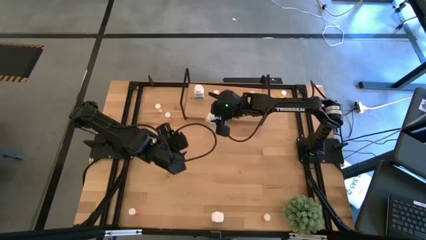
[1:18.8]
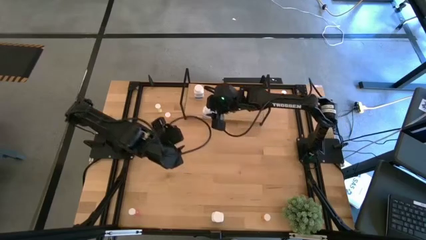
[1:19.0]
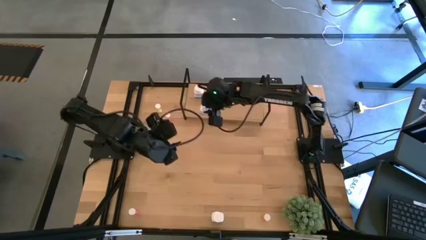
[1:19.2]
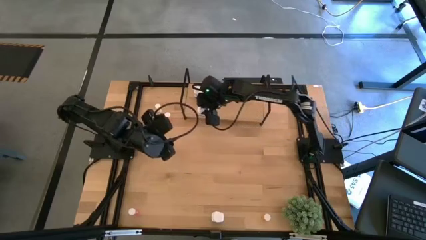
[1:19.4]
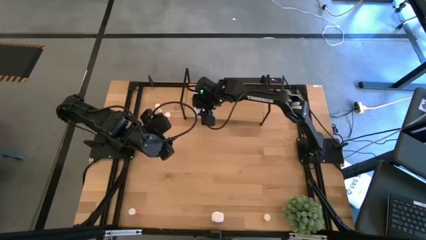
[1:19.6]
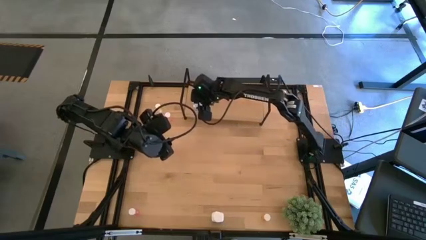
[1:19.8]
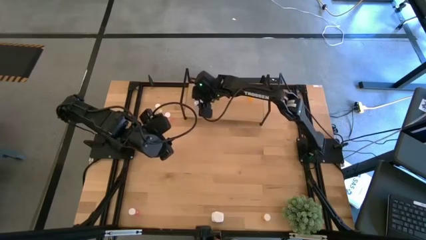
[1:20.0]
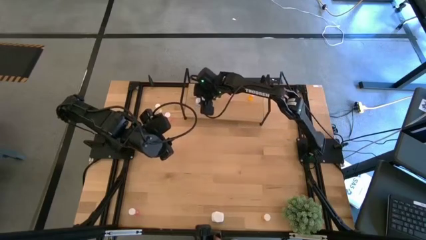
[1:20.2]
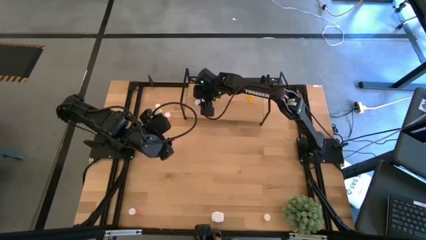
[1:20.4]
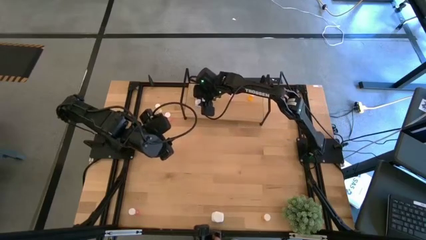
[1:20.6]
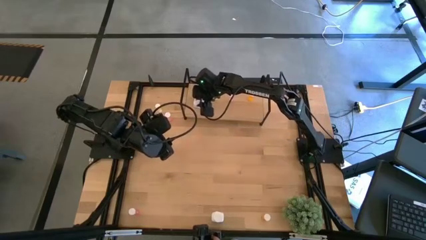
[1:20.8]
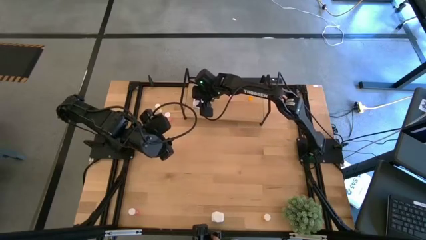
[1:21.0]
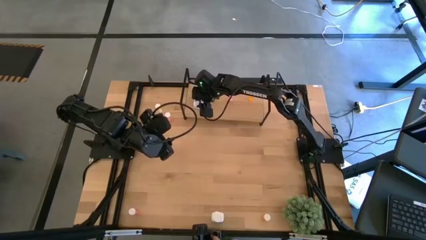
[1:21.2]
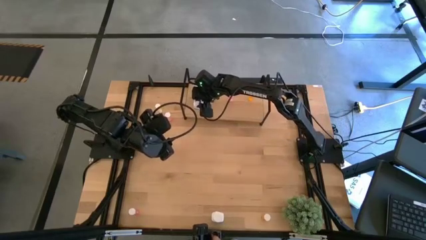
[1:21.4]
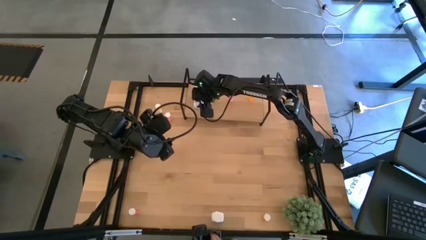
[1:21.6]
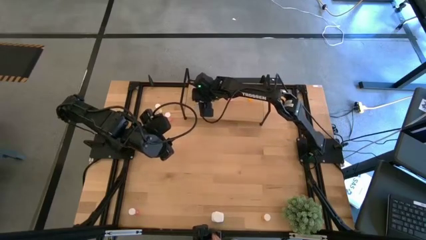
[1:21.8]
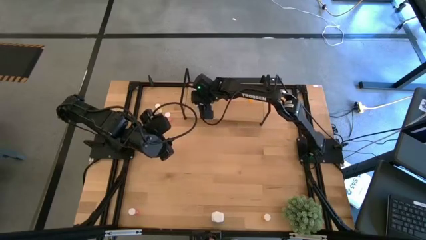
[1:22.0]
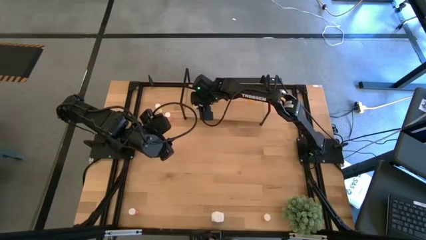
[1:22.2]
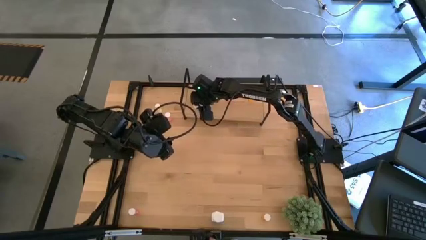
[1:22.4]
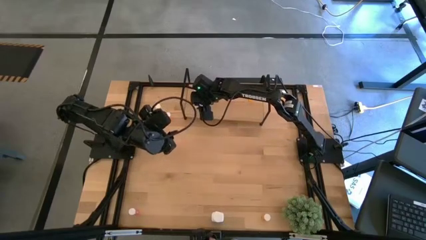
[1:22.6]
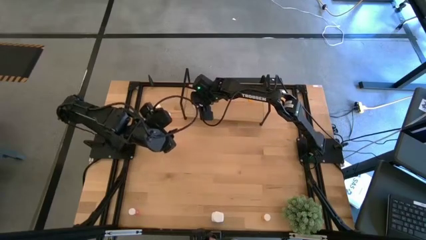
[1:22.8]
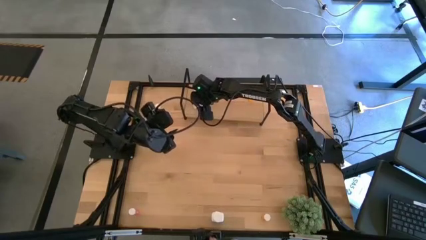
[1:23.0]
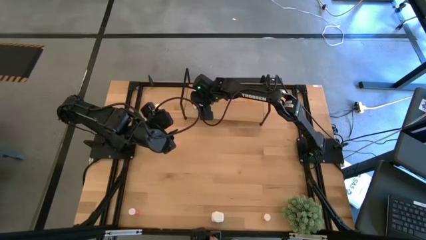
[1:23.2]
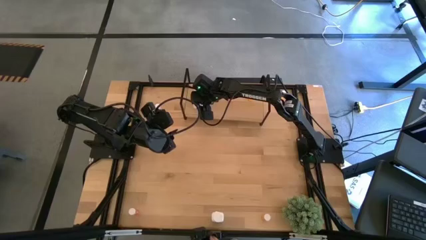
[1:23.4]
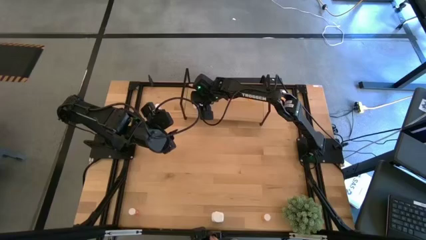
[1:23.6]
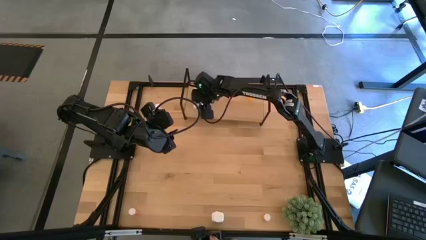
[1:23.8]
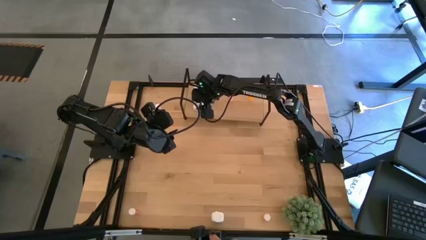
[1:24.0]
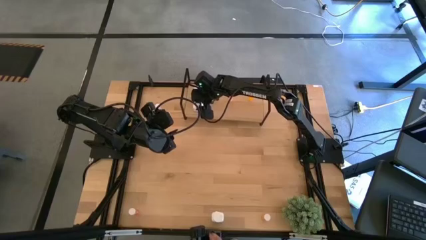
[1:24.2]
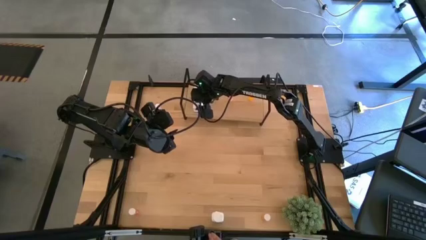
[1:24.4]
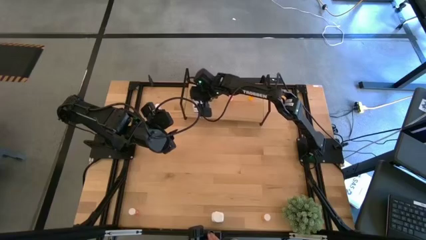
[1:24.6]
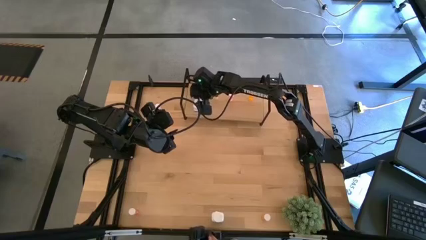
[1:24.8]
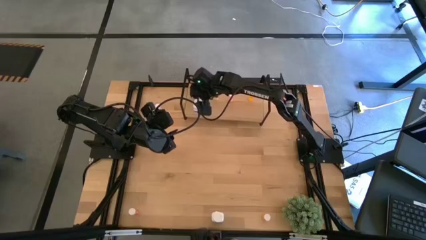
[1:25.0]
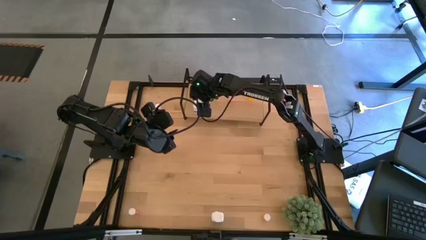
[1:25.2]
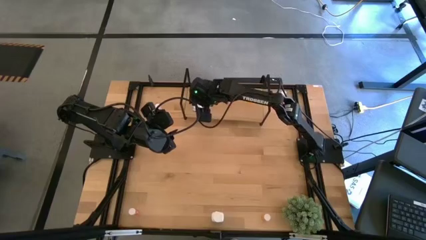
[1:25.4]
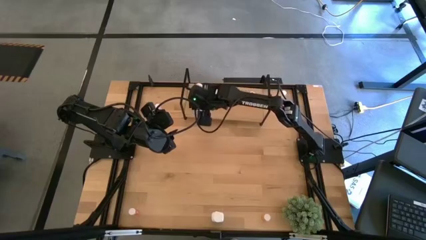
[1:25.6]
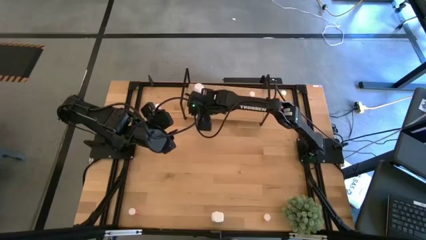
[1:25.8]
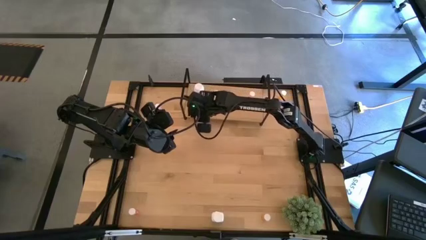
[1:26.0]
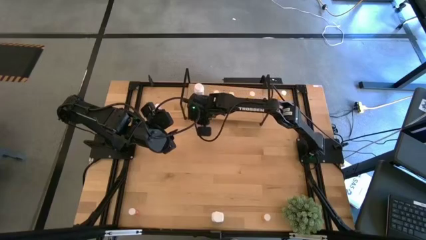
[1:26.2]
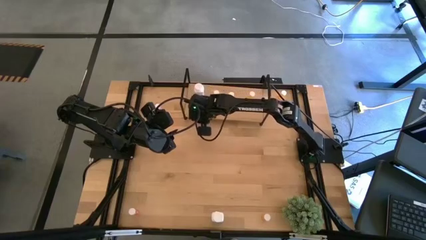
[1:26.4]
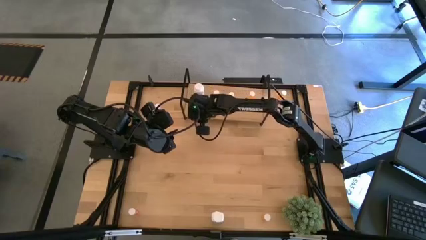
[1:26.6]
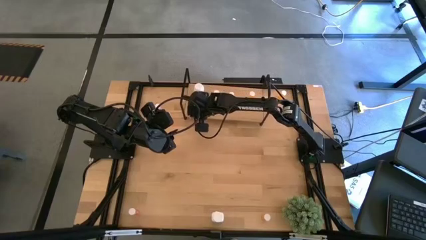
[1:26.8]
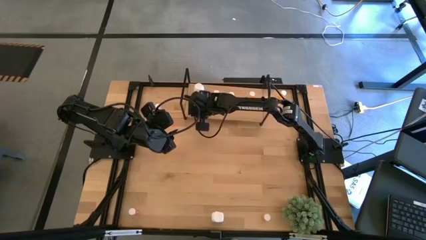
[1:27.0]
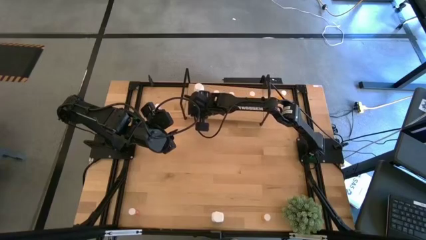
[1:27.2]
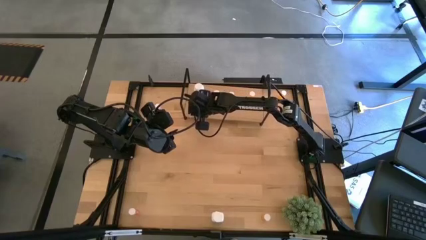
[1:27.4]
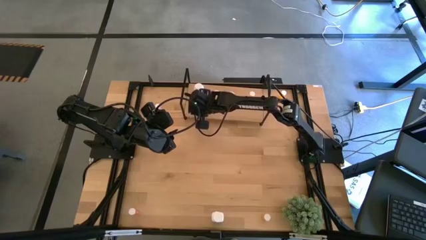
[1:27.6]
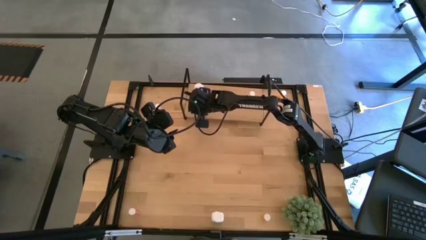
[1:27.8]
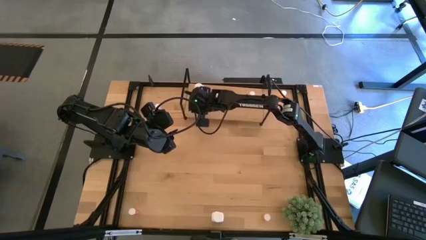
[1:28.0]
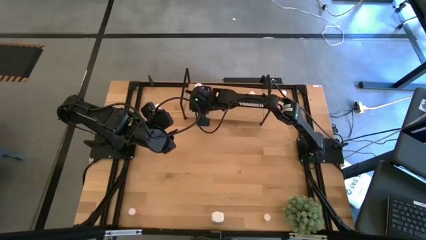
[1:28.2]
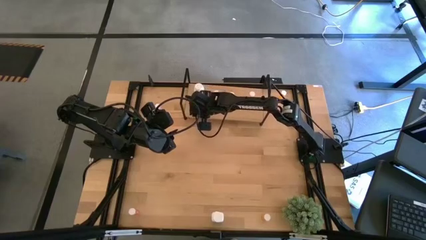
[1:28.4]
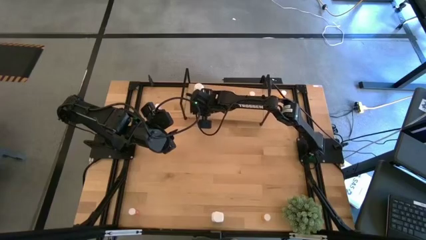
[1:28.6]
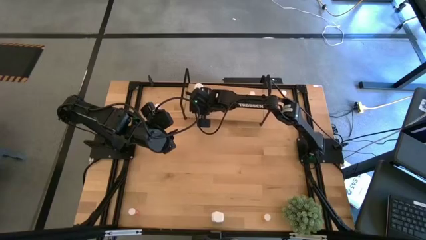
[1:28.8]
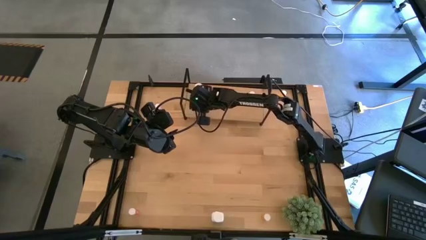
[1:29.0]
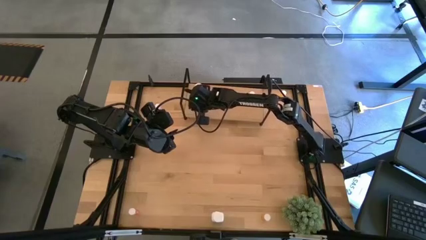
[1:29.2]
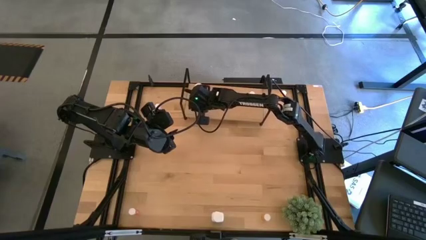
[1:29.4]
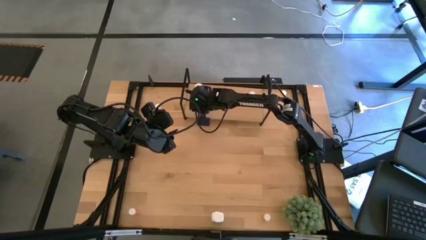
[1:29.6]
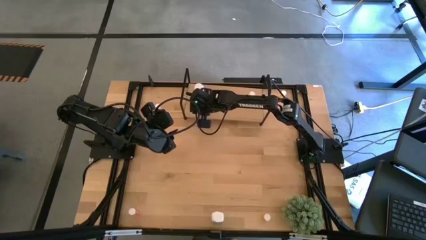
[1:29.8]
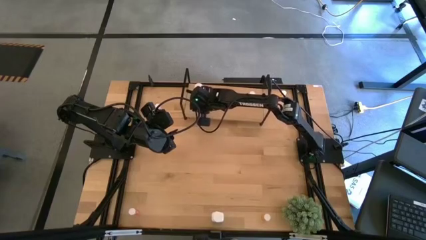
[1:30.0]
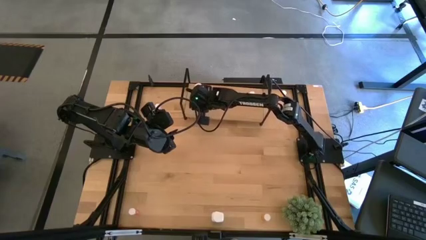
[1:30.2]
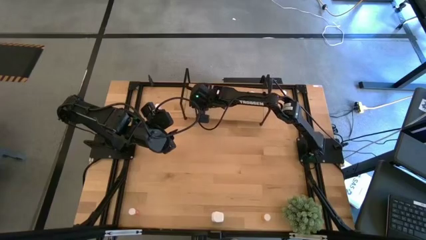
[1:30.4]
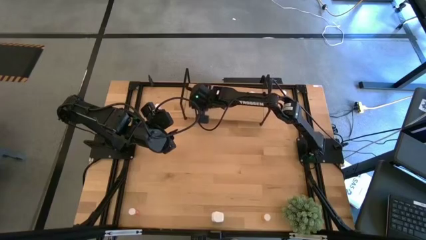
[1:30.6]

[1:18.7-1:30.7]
Task: Pick and place medicine bottles onto shelf by color
Put the top white pill bottle on the shelf aligned with the other white pill bottle
